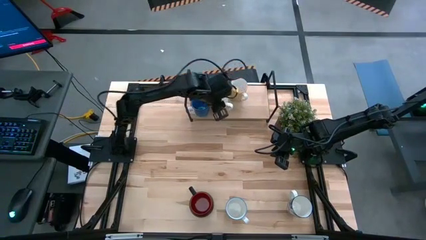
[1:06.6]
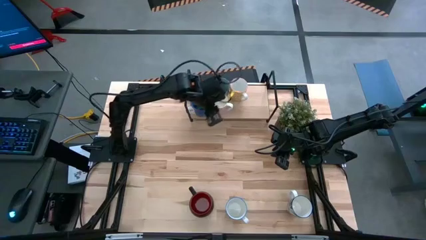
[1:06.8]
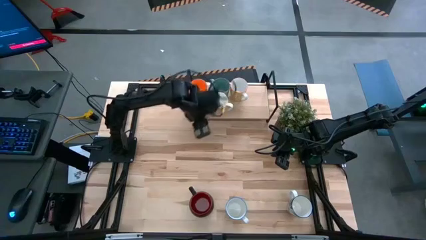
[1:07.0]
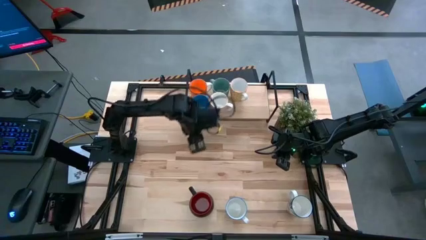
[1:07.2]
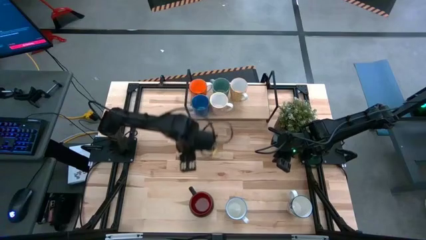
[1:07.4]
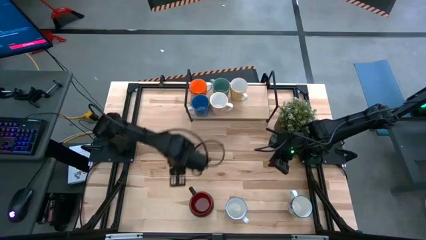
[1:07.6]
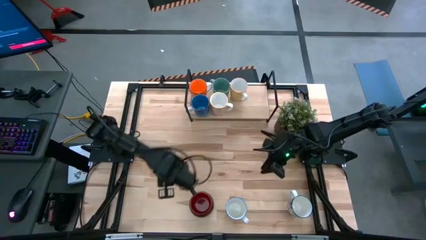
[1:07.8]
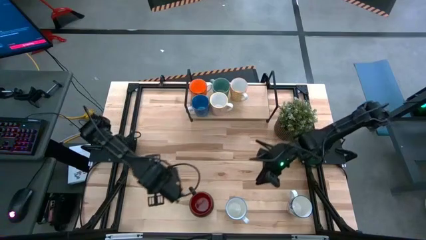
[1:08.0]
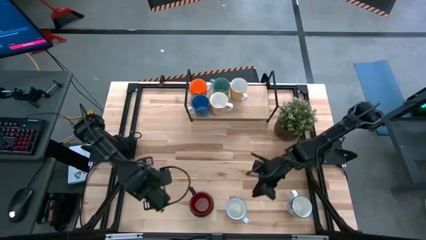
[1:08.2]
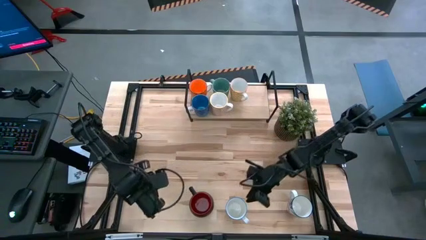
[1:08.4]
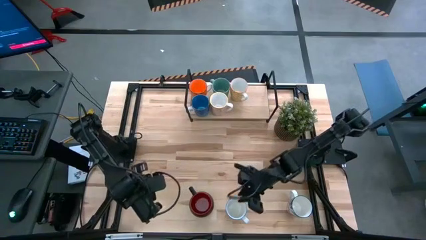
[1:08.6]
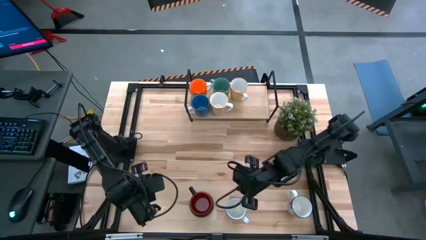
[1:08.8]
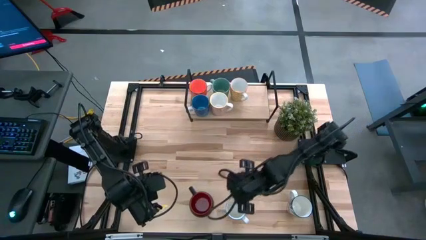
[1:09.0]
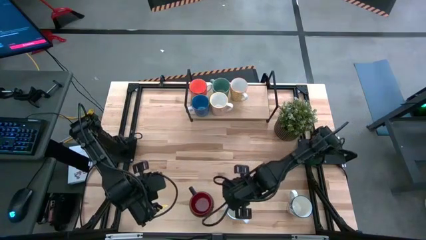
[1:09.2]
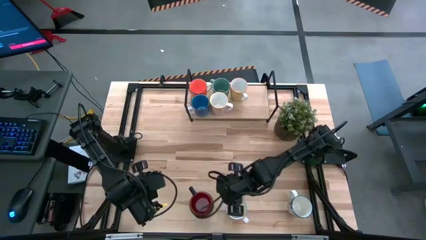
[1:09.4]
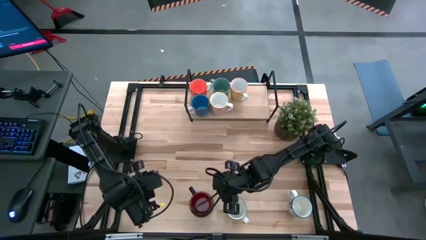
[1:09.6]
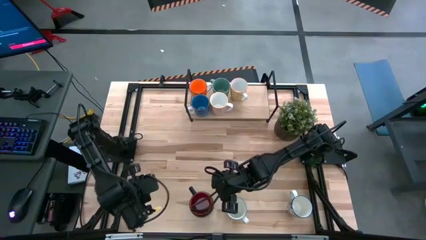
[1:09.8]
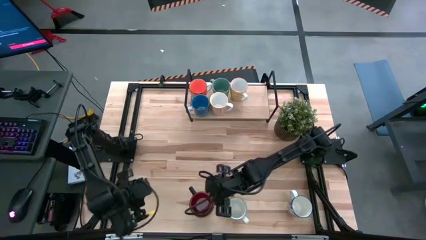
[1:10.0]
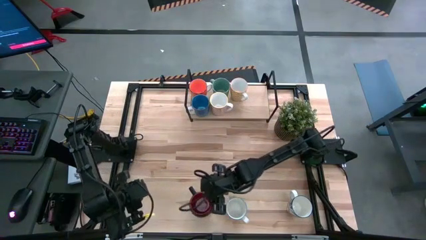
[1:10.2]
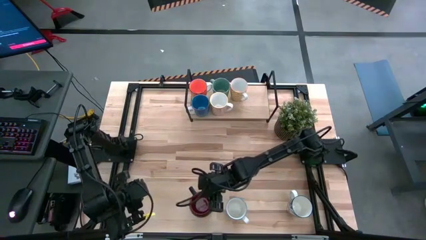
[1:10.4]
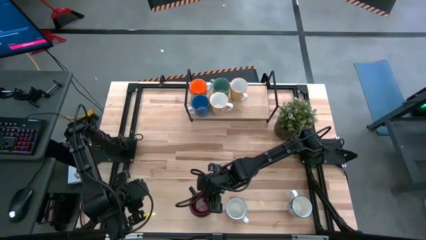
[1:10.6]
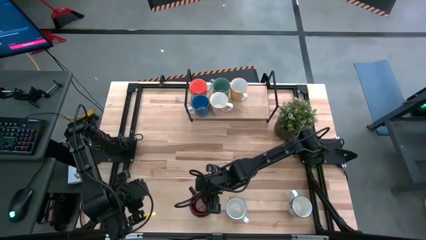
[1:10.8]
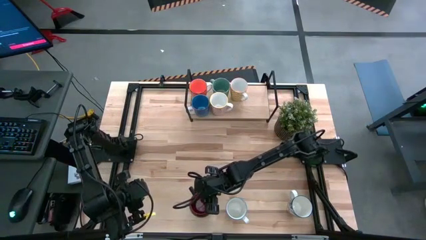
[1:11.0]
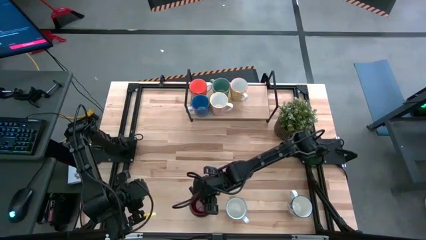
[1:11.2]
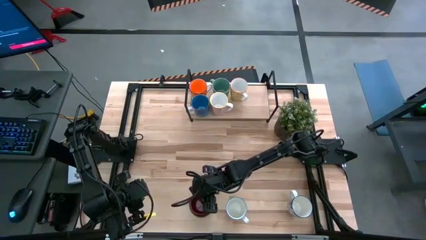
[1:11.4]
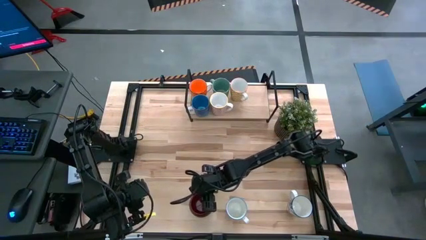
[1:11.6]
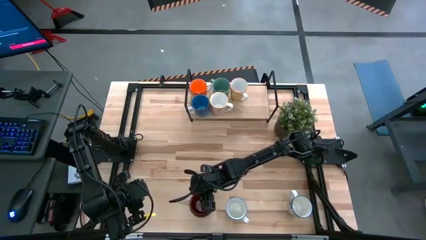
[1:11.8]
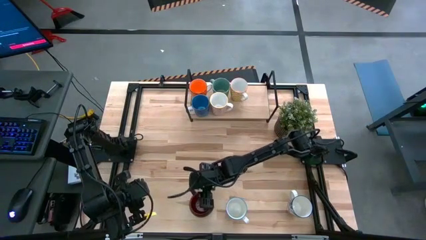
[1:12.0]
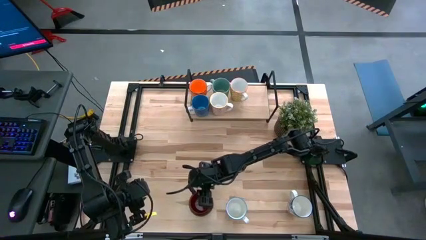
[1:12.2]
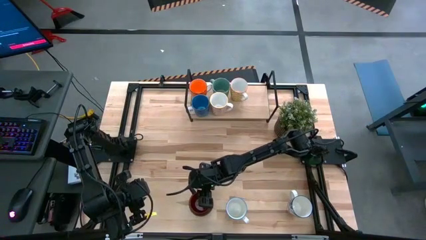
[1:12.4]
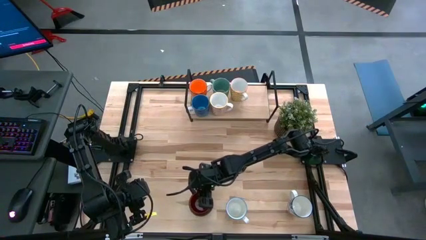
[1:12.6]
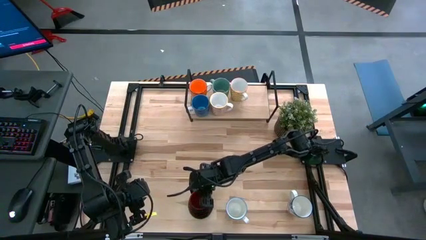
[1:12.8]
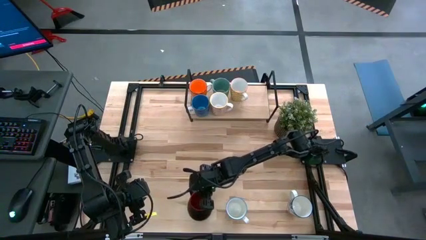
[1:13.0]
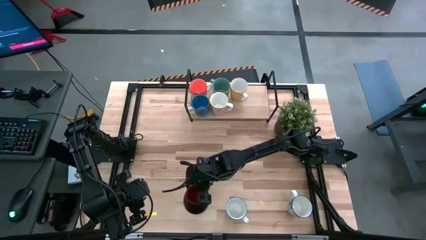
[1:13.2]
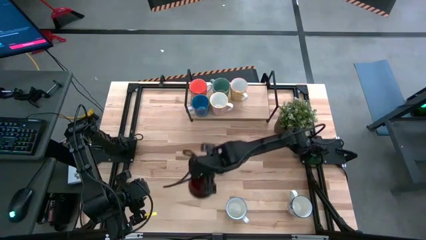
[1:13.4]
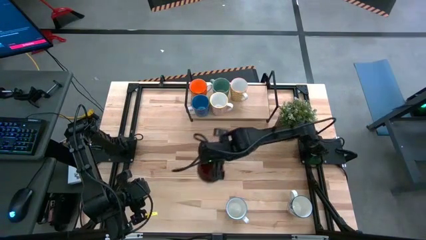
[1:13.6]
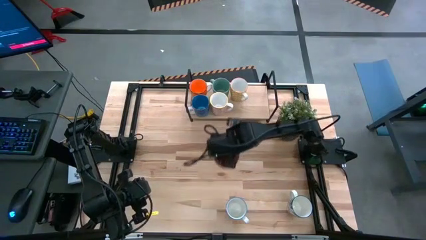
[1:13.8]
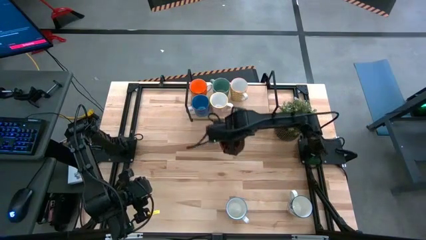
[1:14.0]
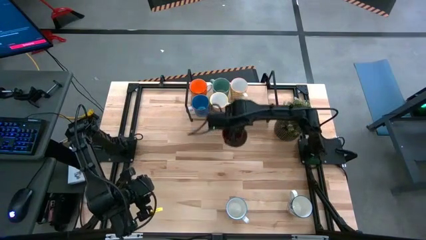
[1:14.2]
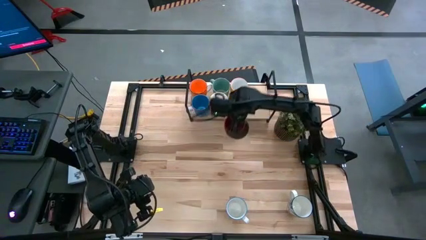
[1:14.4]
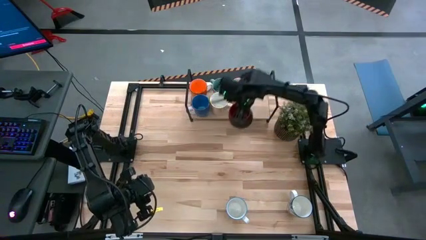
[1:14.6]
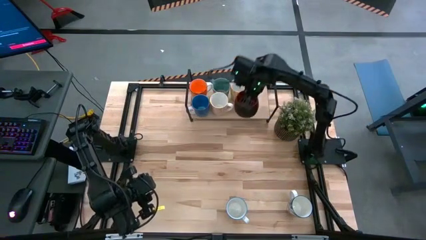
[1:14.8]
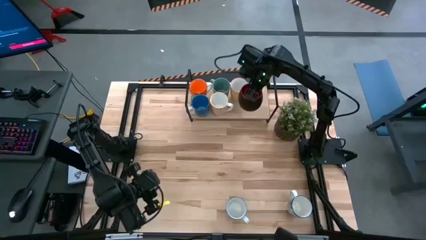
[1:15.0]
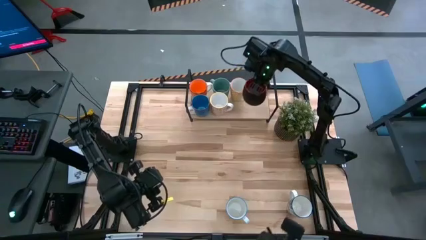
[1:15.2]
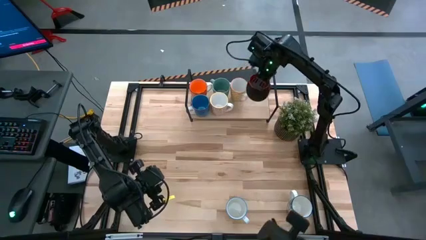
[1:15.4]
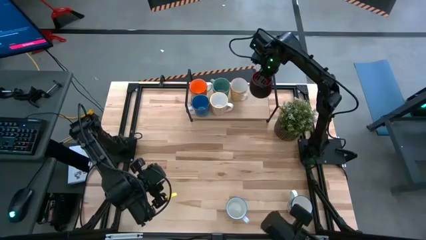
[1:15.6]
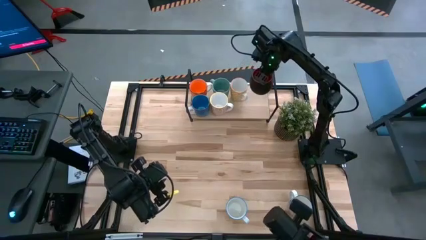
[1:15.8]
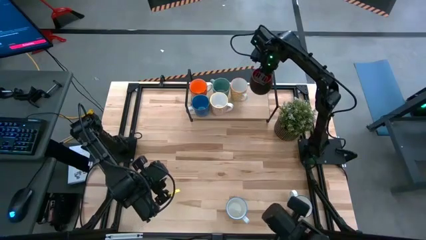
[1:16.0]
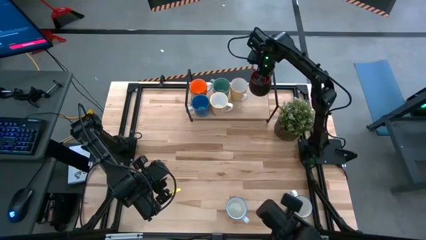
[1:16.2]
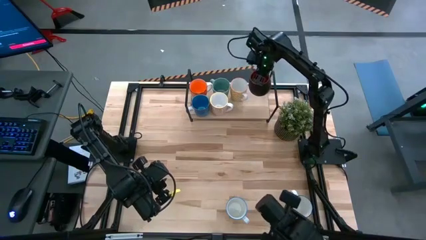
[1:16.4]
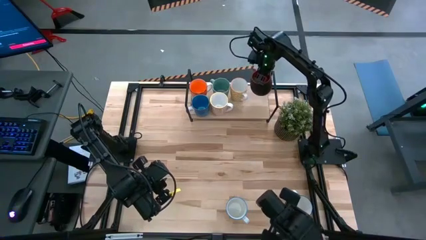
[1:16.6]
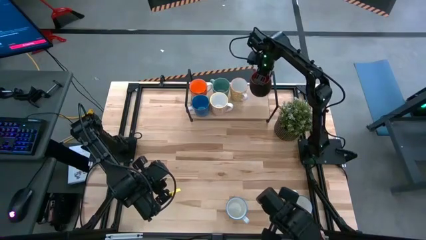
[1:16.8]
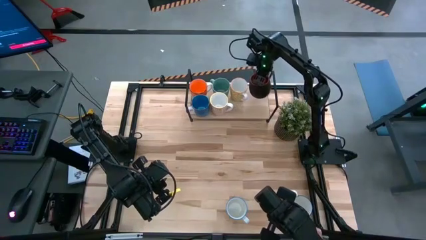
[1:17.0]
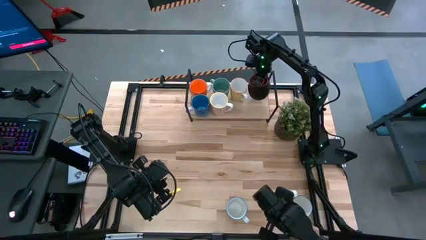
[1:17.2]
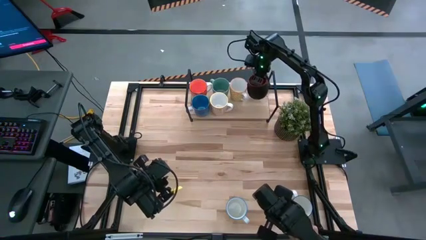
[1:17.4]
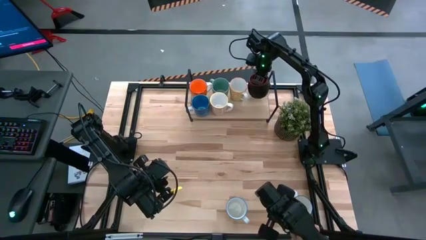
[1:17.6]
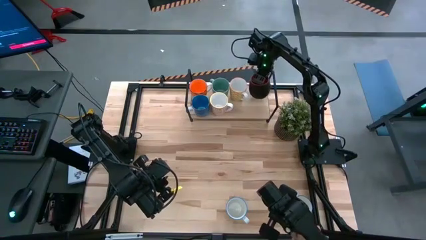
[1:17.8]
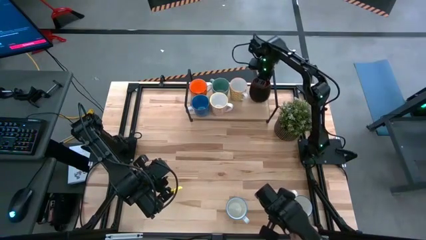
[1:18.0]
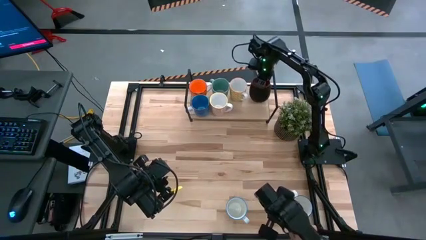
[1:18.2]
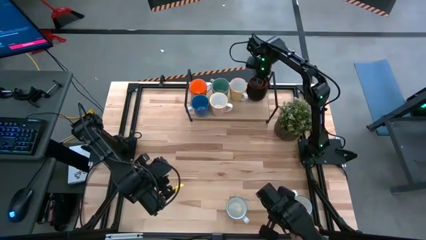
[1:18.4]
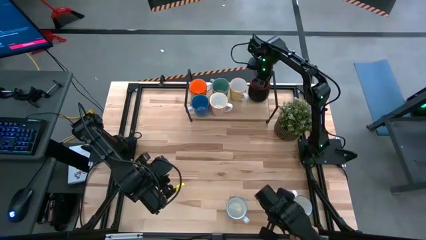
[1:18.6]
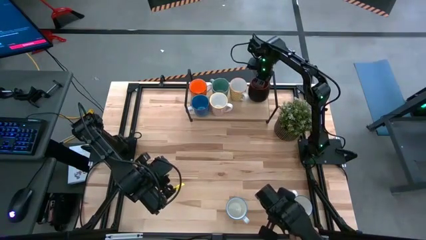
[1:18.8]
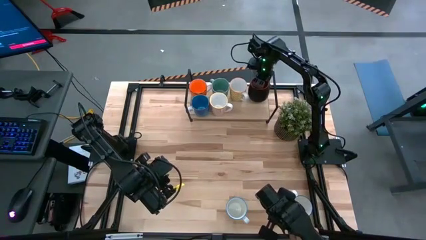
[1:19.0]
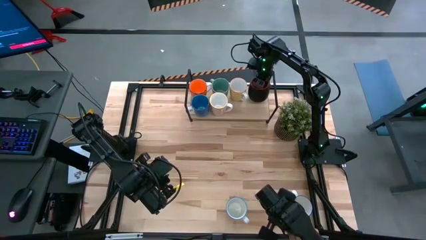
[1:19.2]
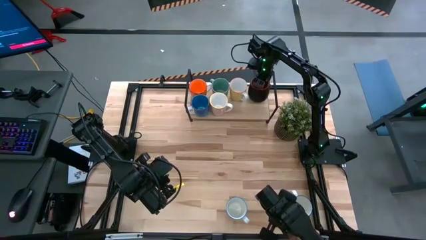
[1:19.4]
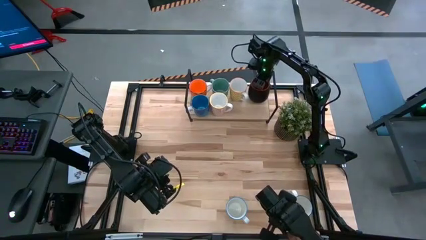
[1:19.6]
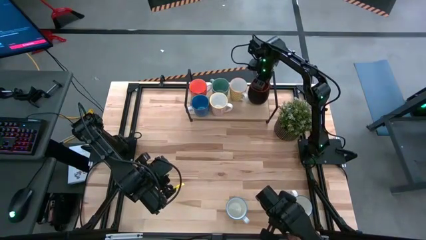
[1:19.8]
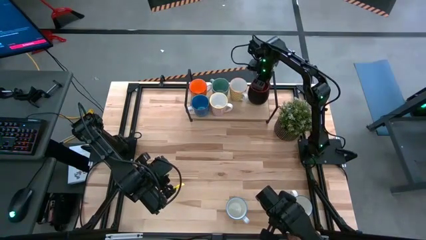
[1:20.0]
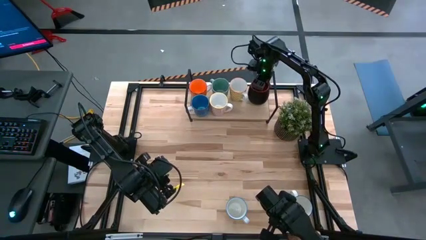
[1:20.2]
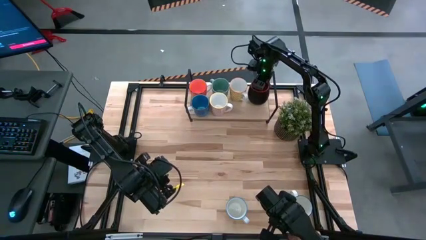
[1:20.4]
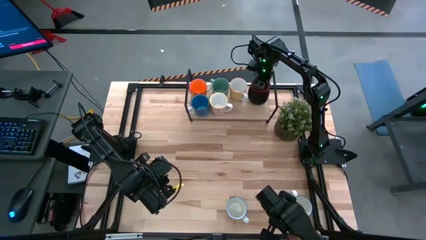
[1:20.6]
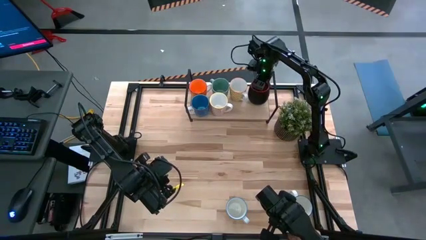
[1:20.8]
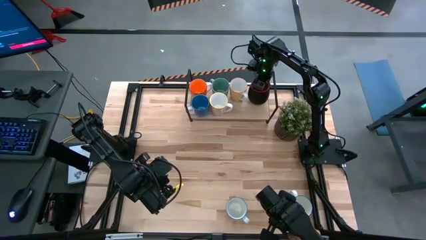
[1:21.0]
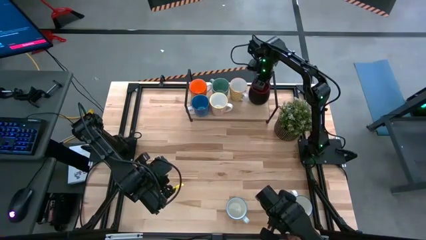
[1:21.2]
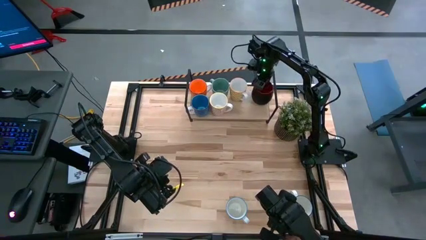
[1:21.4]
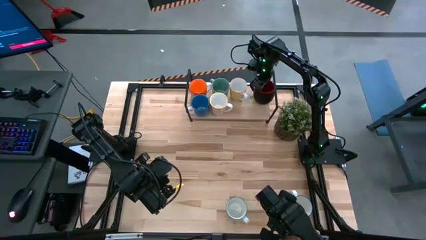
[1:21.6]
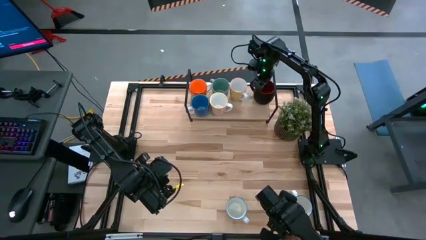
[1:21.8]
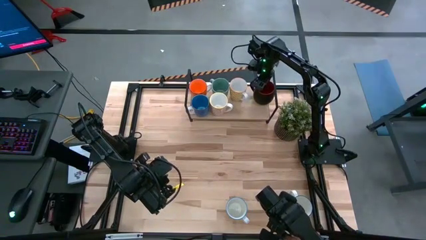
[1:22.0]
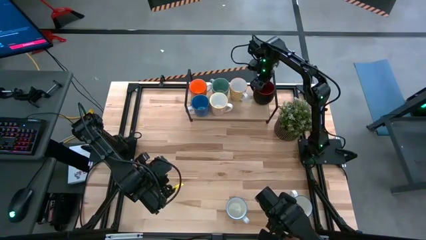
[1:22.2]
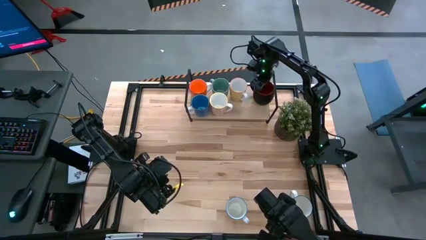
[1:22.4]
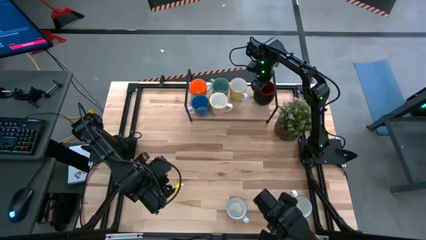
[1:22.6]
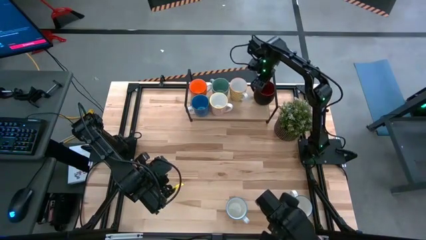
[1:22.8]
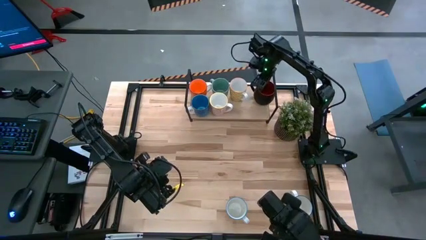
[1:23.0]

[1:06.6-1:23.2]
Task: Place coffee mugs
Put the black mug on the shelf
